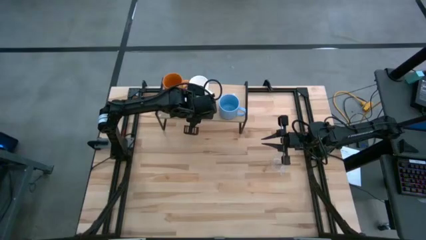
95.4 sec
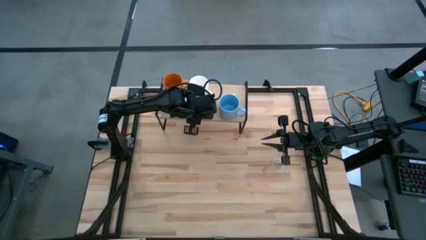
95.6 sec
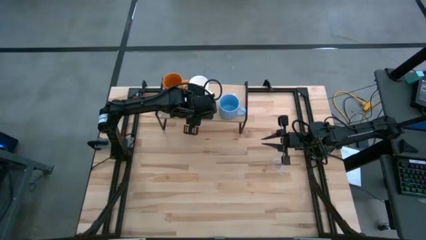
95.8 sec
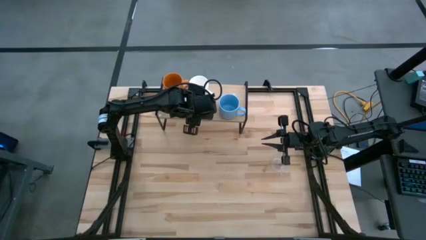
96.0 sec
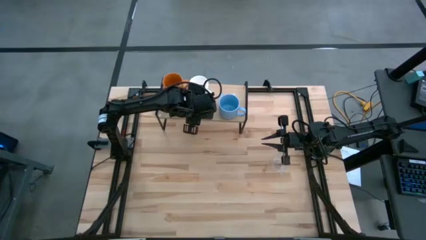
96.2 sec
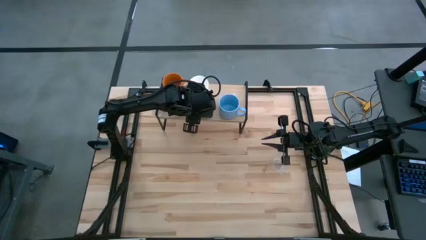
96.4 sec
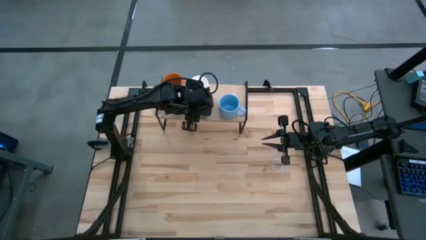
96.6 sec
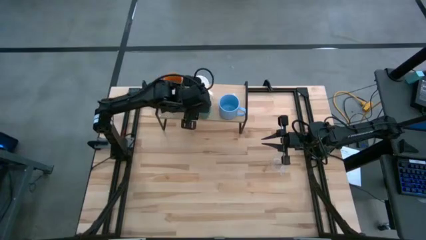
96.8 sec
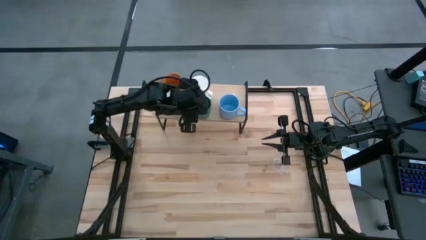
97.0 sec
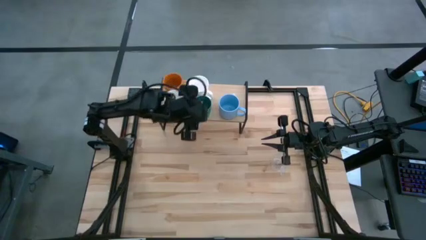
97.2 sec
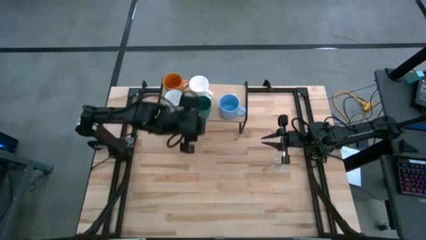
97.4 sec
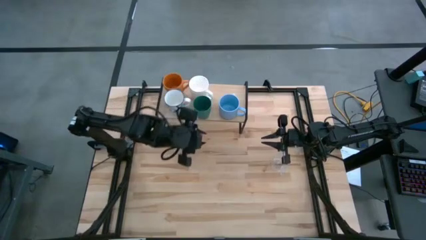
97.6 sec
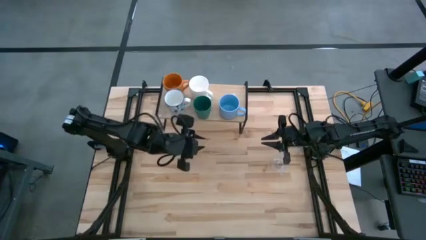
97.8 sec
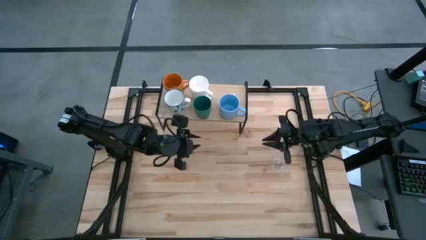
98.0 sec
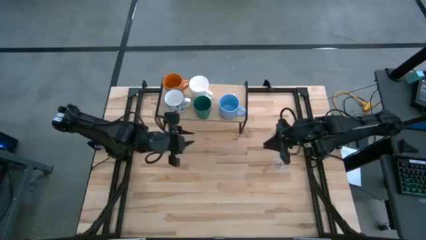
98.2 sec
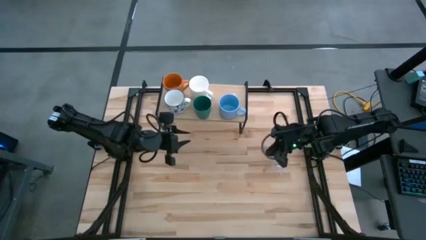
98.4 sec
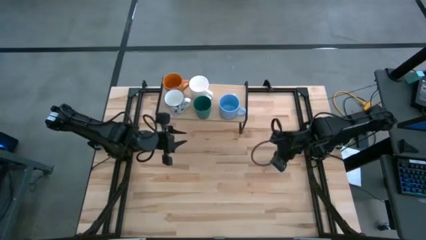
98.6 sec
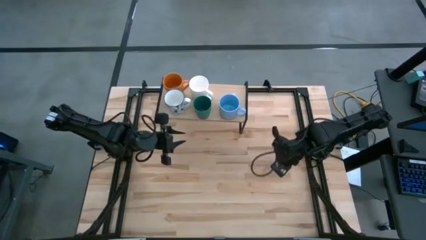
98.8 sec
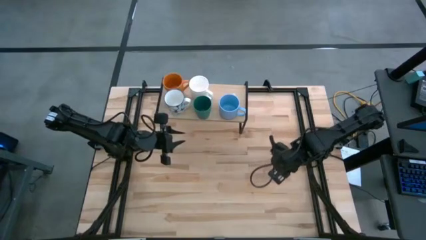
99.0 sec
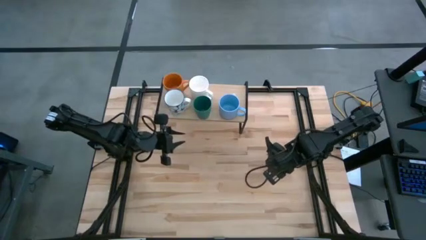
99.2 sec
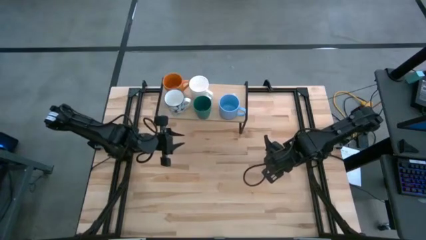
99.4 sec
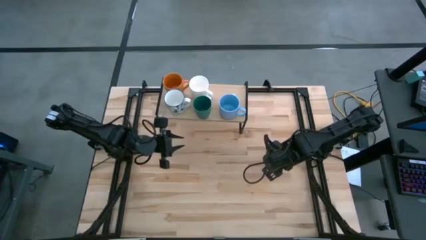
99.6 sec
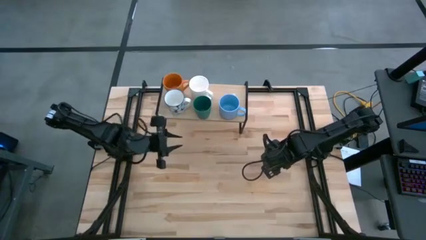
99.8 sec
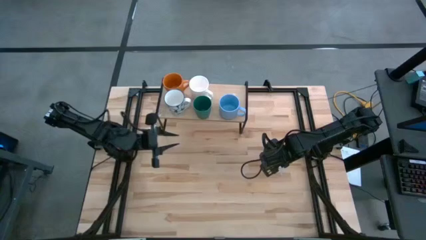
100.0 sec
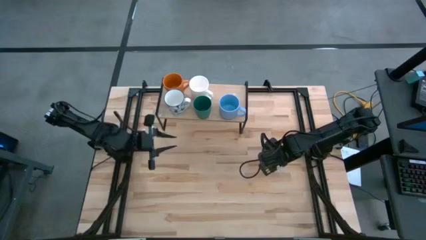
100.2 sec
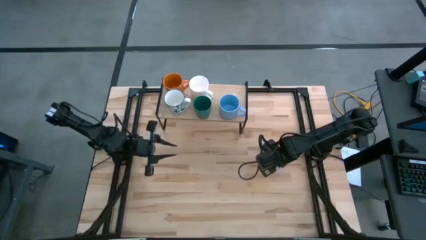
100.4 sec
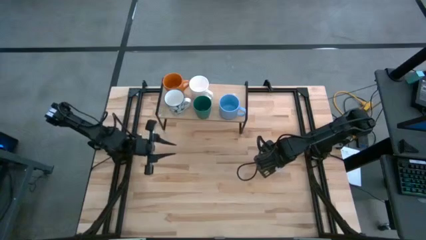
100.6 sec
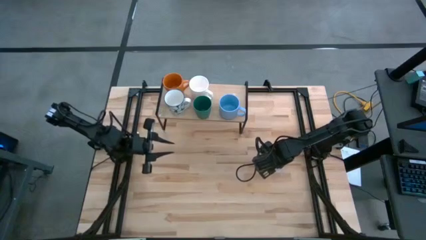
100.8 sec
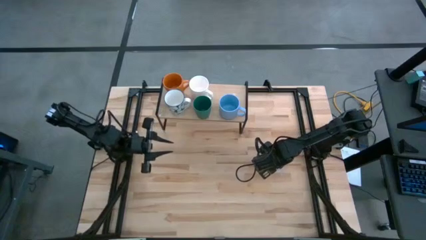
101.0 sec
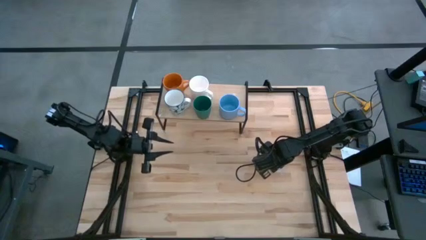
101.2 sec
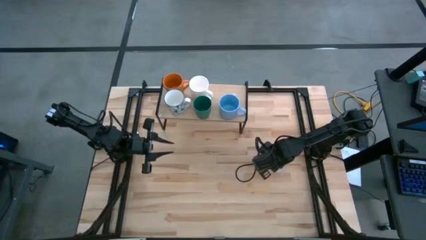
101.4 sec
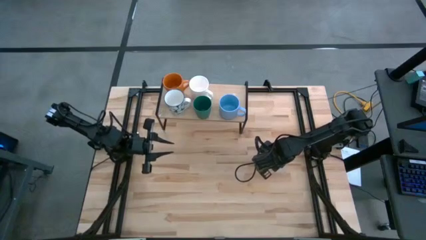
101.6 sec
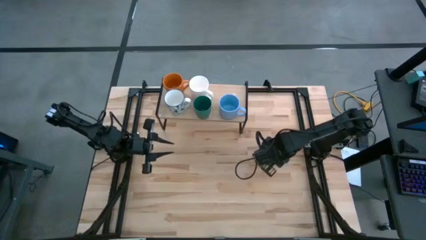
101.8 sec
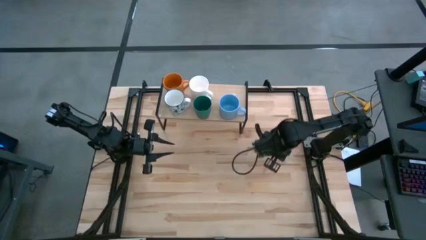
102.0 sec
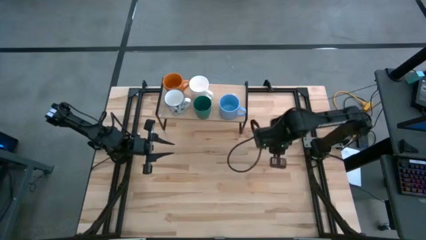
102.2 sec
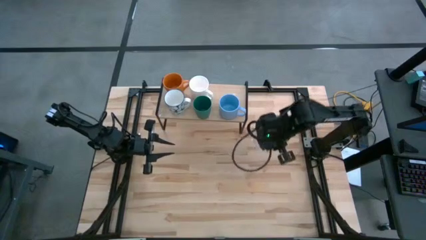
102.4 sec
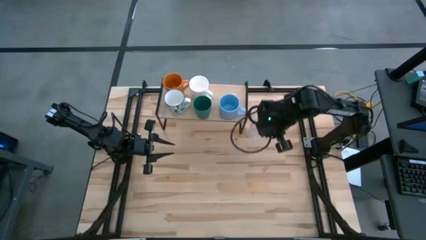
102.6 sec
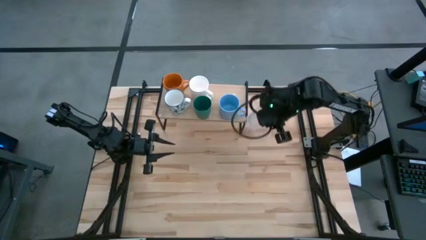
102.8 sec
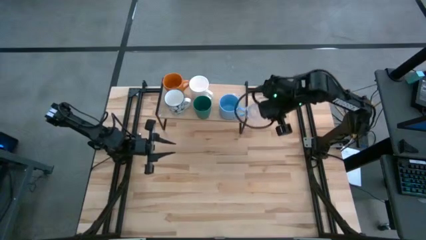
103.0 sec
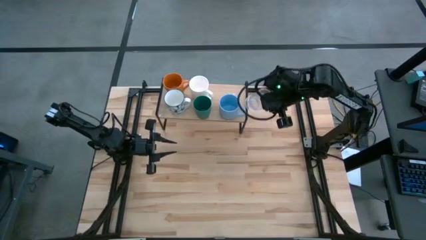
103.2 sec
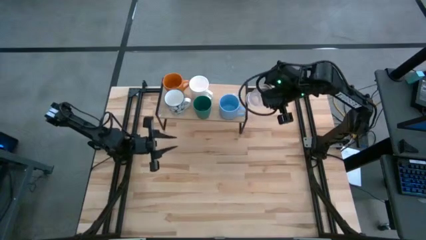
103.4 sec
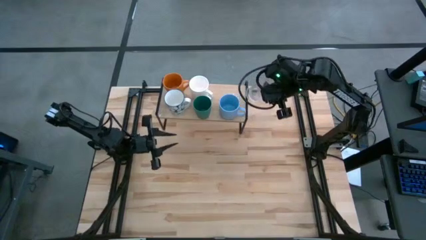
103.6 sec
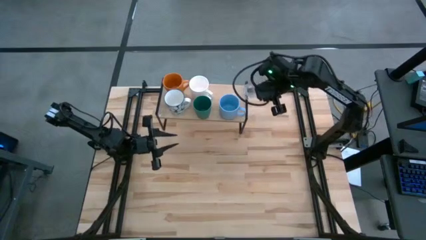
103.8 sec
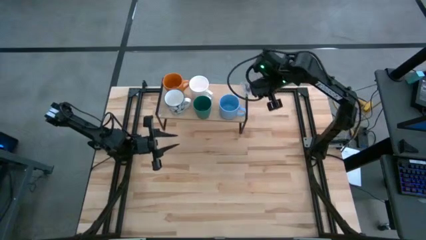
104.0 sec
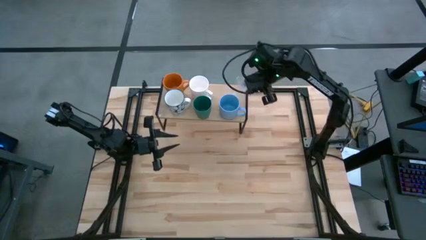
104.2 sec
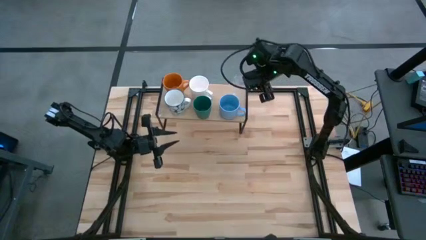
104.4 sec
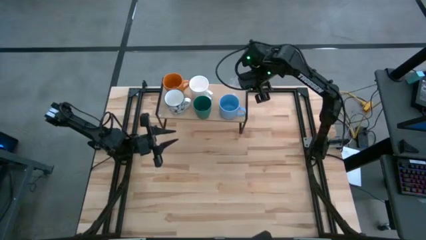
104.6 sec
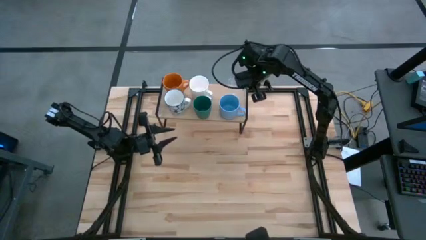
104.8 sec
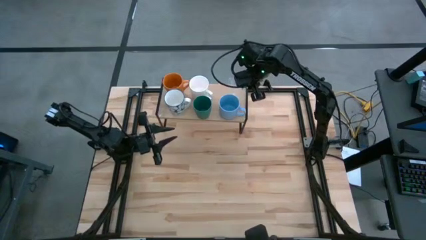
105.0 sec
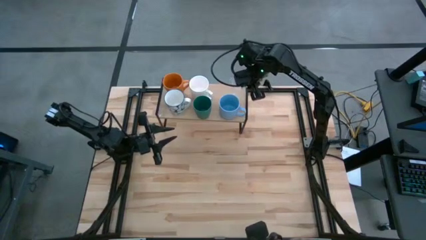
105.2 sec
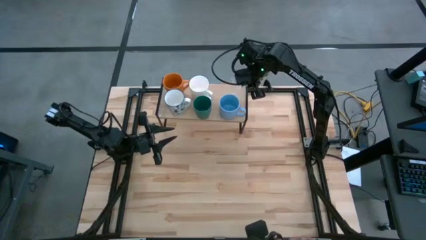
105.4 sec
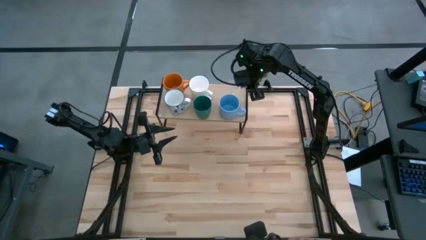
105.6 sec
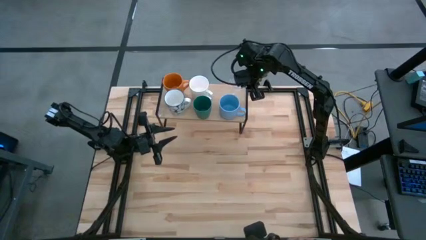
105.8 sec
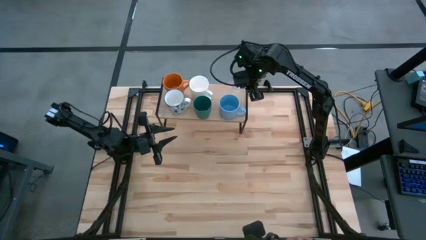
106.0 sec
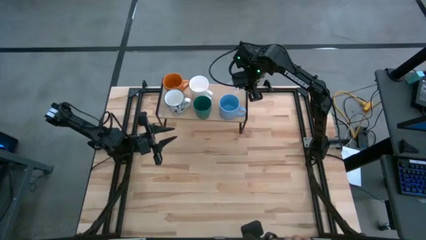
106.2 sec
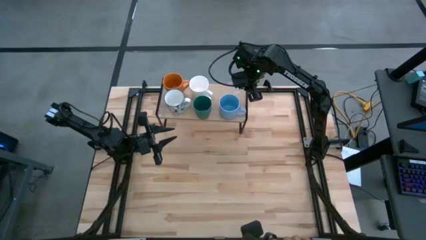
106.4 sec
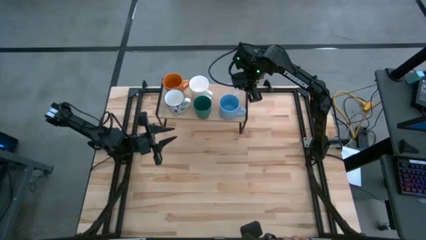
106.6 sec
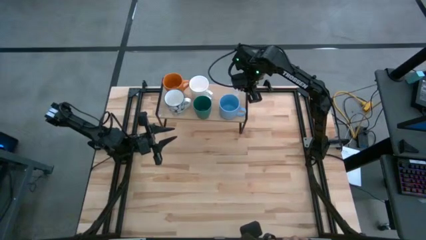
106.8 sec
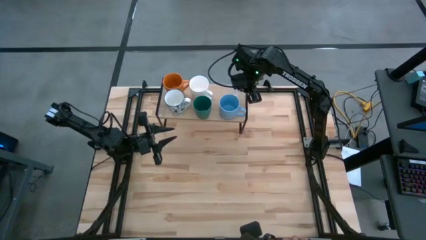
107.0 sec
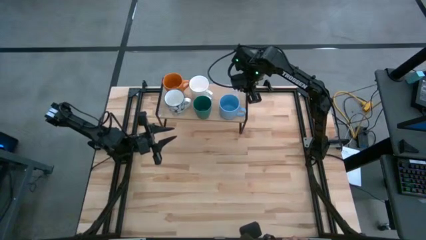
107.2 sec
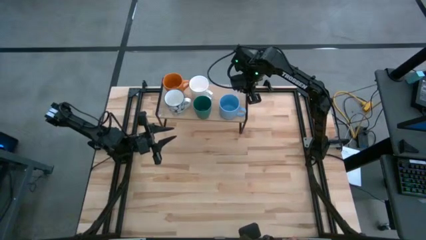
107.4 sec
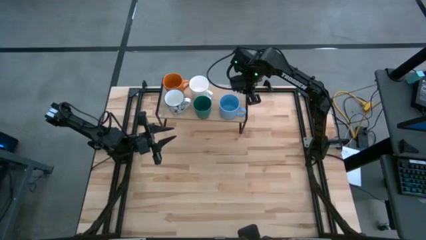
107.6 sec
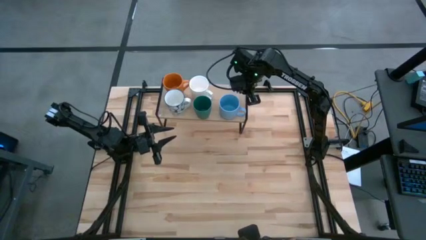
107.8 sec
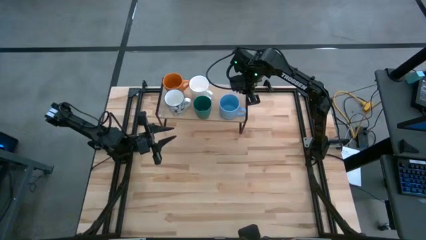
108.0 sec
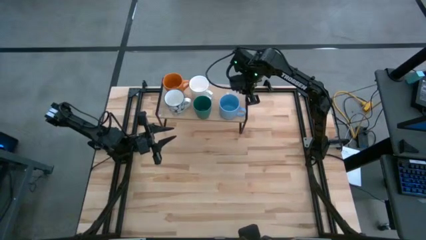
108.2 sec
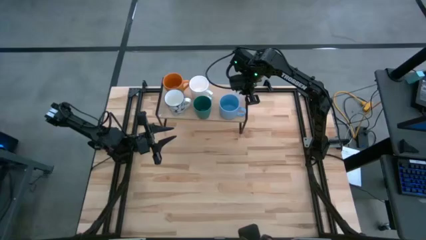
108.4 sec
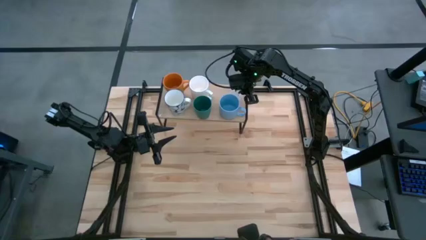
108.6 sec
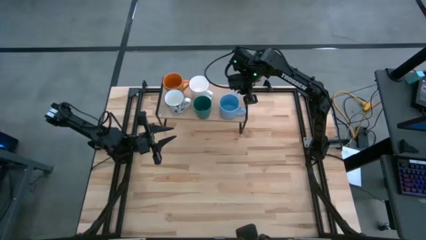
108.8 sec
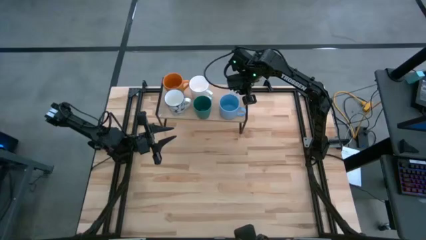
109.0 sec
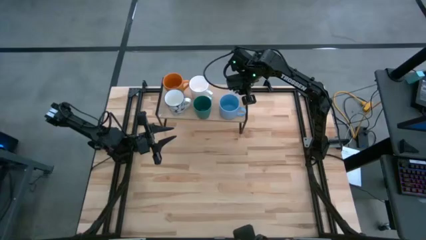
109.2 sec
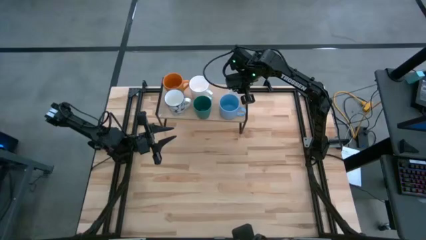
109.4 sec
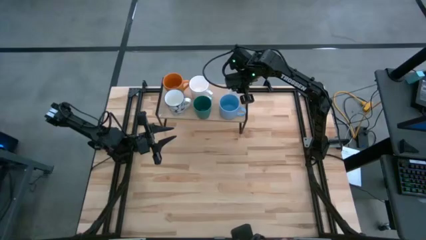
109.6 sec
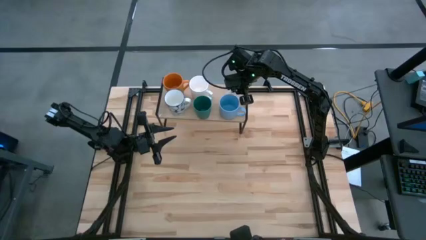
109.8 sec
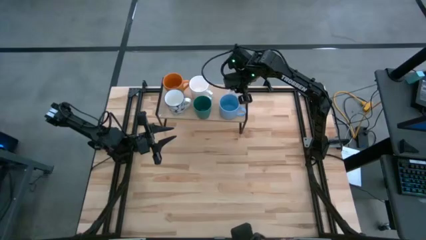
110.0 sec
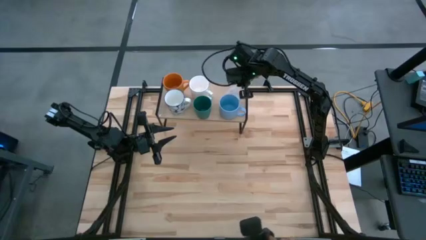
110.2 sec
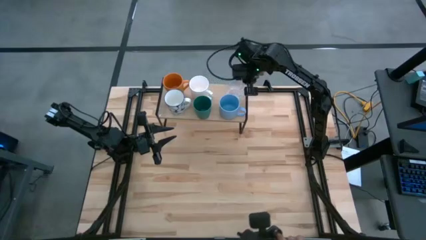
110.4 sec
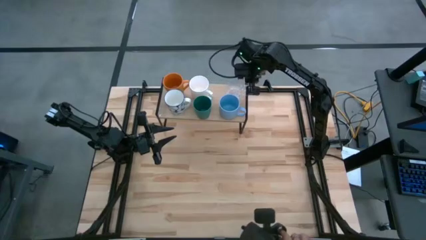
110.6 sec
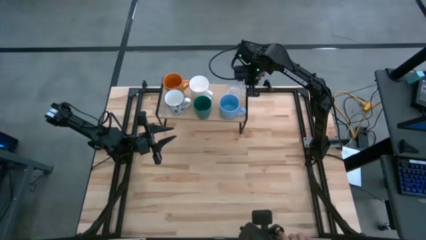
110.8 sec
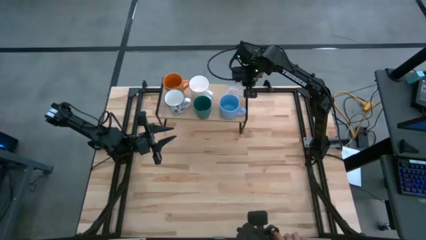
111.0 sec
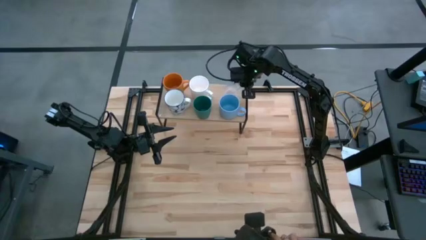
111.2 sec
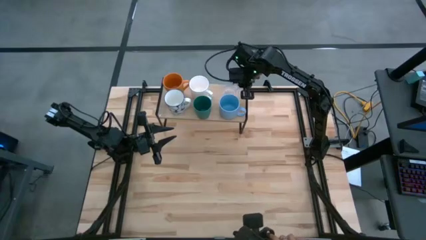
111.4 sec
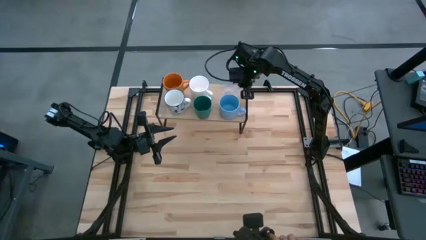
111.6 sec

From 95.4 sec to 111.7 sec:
Task: Stack small to large cups/mugs on shelf
Put the transparent mug on the shelf
